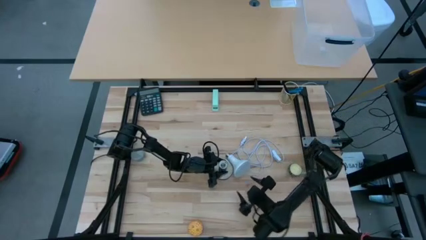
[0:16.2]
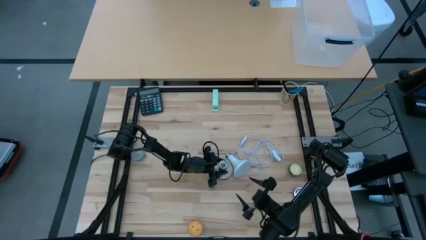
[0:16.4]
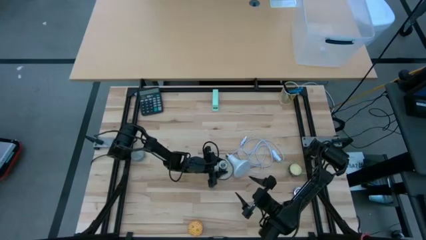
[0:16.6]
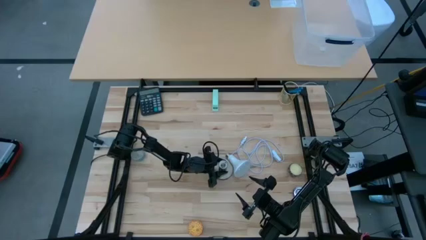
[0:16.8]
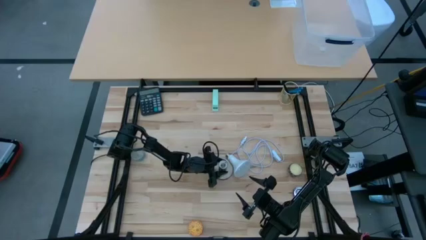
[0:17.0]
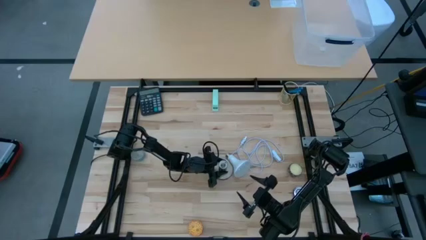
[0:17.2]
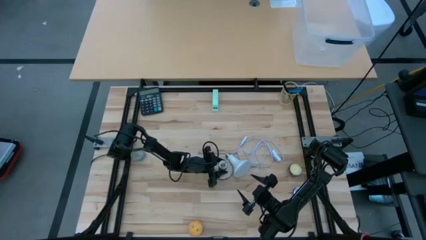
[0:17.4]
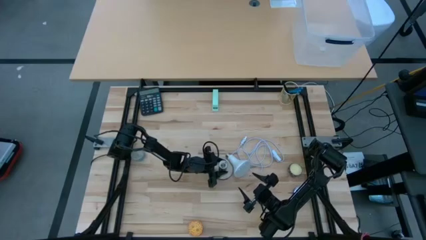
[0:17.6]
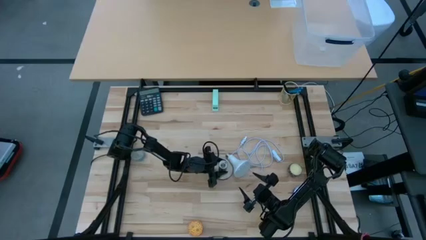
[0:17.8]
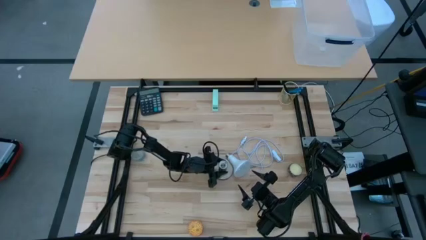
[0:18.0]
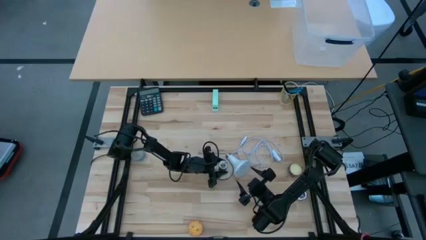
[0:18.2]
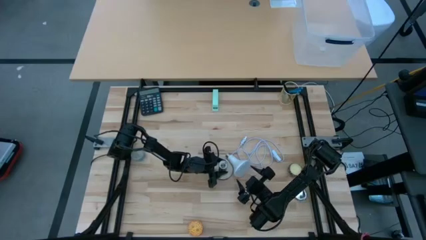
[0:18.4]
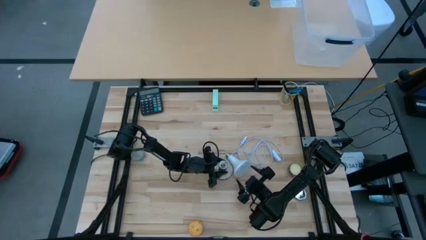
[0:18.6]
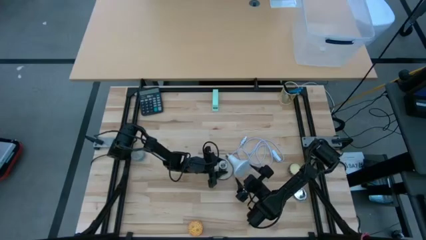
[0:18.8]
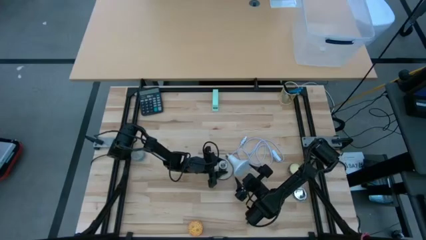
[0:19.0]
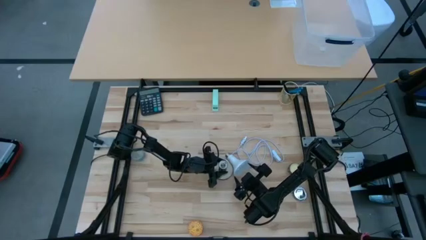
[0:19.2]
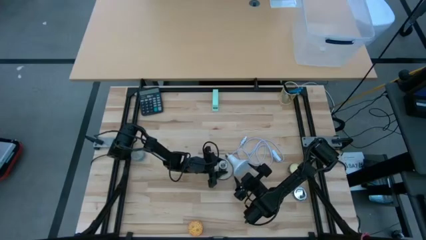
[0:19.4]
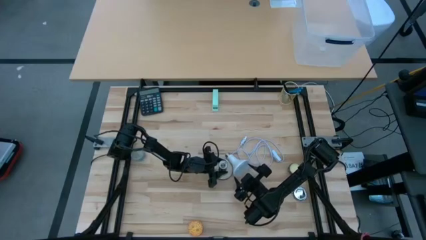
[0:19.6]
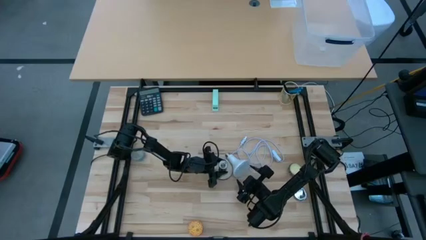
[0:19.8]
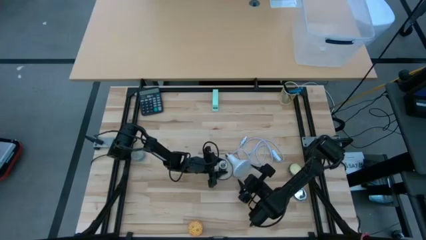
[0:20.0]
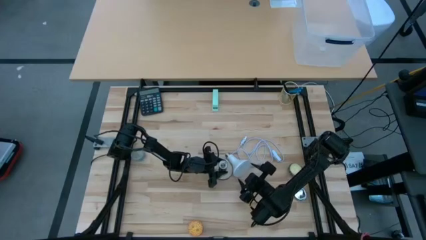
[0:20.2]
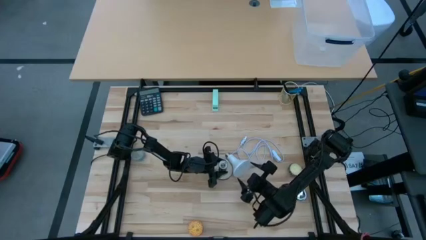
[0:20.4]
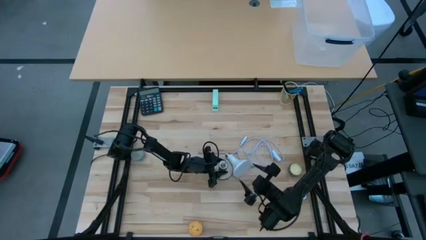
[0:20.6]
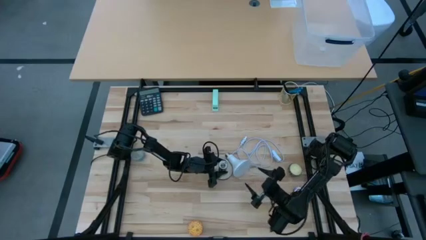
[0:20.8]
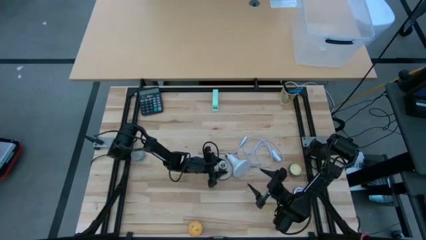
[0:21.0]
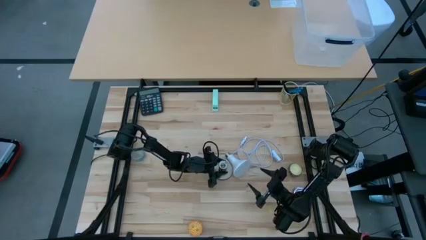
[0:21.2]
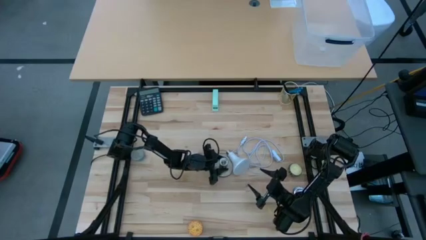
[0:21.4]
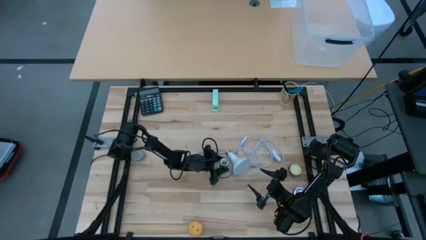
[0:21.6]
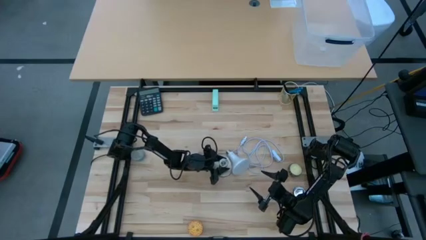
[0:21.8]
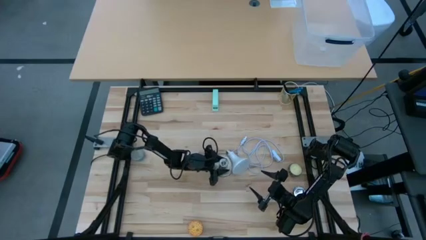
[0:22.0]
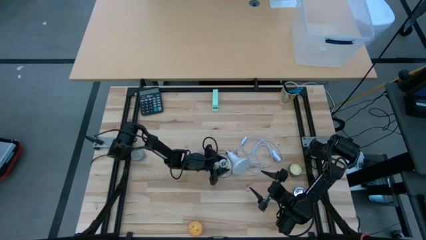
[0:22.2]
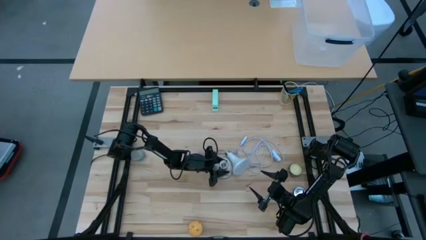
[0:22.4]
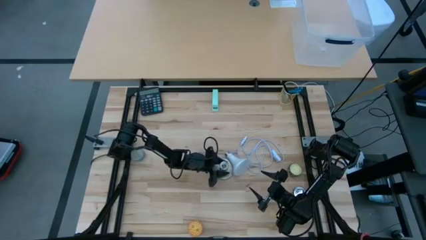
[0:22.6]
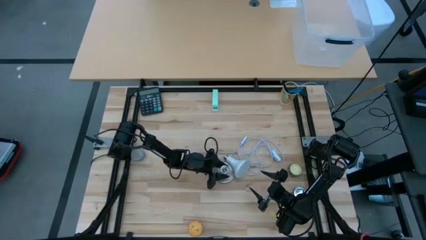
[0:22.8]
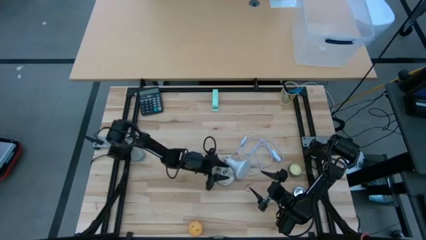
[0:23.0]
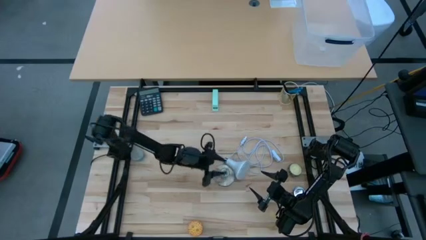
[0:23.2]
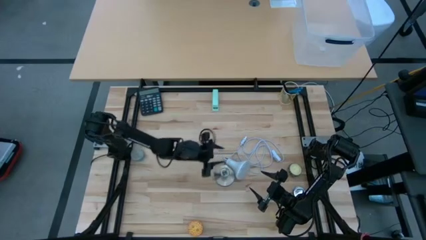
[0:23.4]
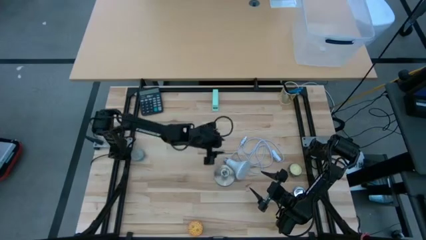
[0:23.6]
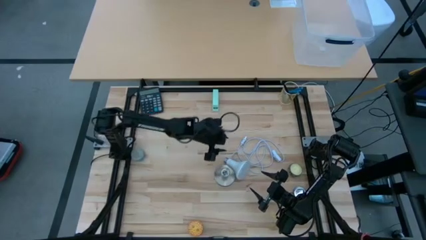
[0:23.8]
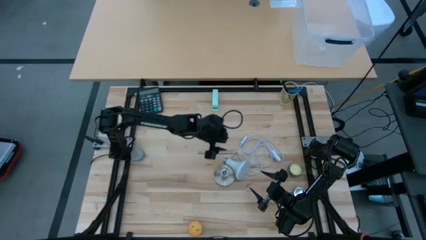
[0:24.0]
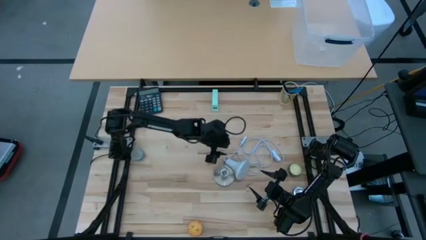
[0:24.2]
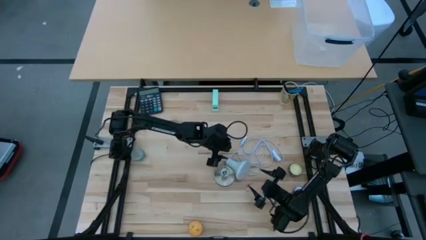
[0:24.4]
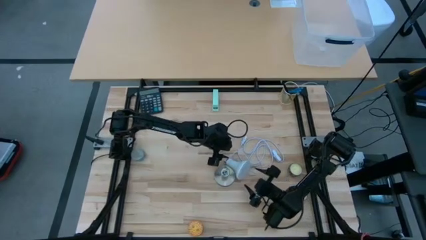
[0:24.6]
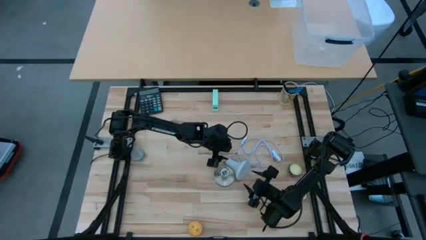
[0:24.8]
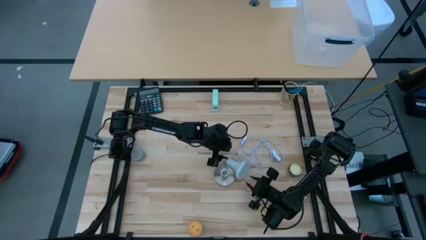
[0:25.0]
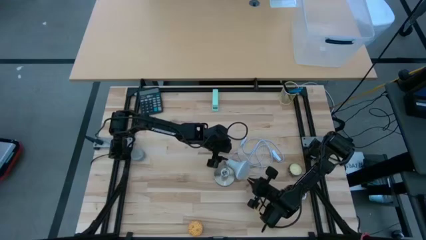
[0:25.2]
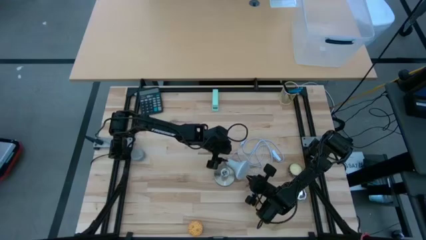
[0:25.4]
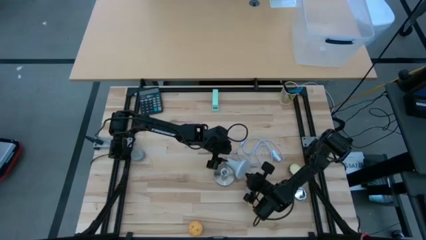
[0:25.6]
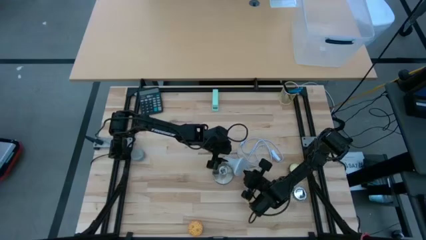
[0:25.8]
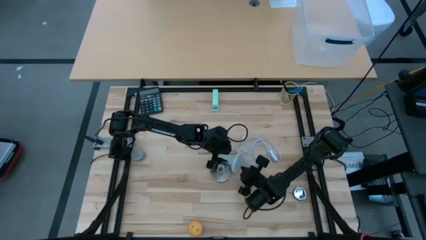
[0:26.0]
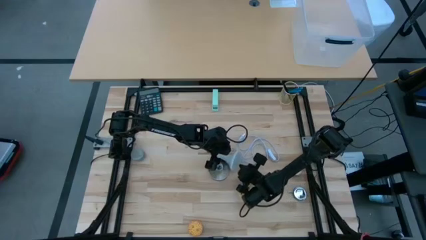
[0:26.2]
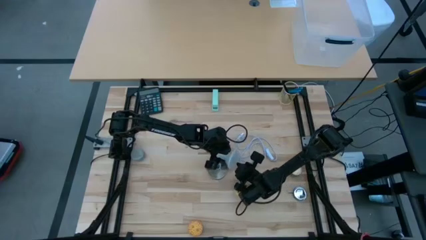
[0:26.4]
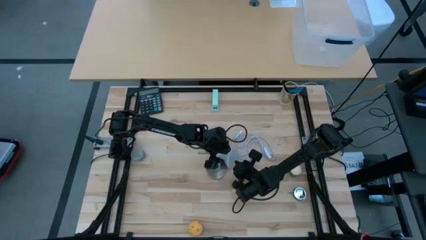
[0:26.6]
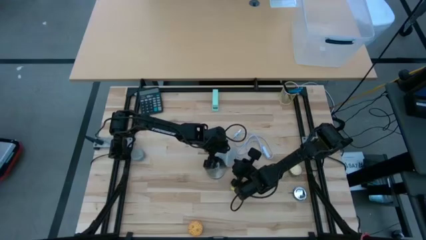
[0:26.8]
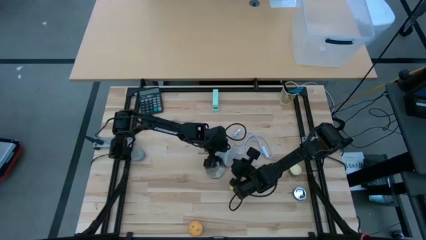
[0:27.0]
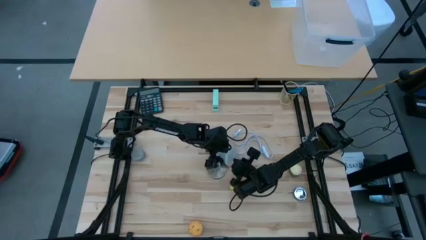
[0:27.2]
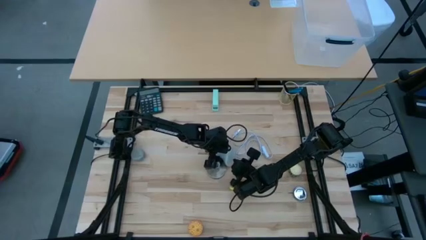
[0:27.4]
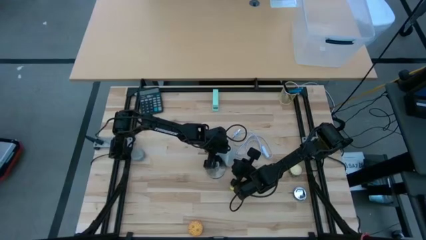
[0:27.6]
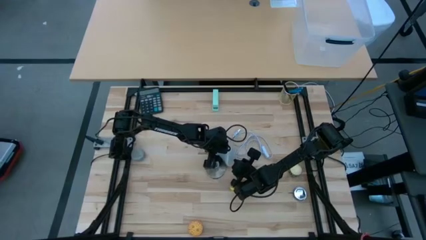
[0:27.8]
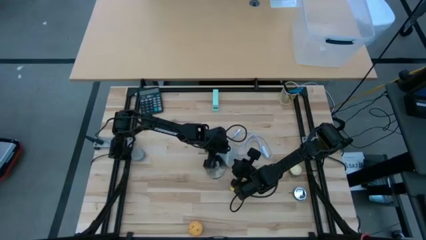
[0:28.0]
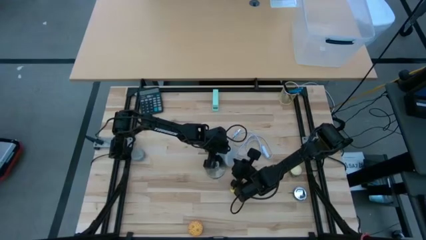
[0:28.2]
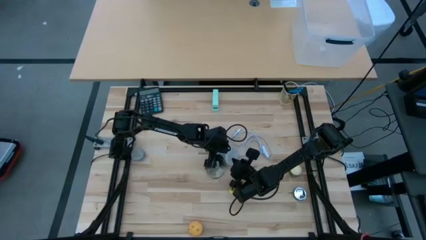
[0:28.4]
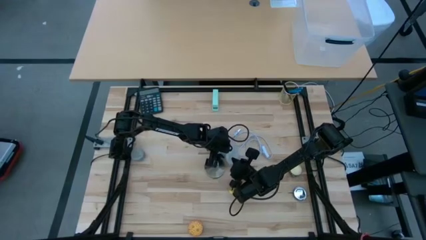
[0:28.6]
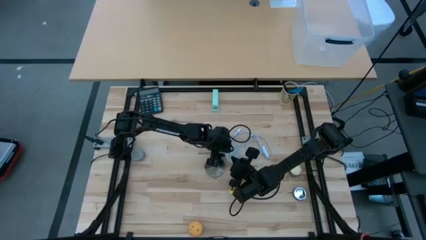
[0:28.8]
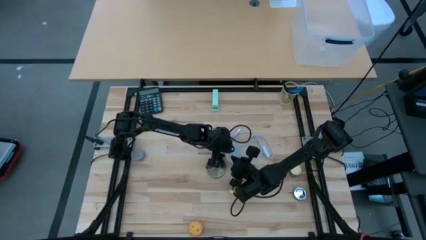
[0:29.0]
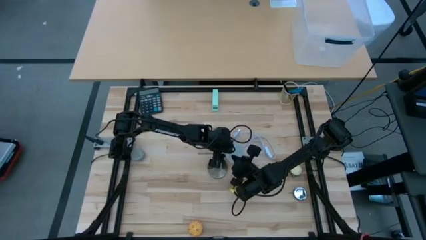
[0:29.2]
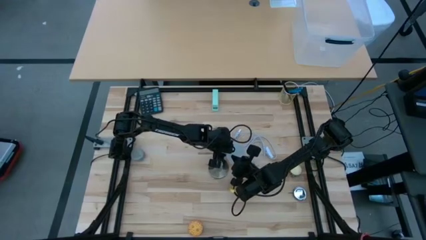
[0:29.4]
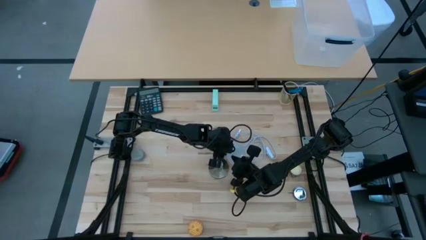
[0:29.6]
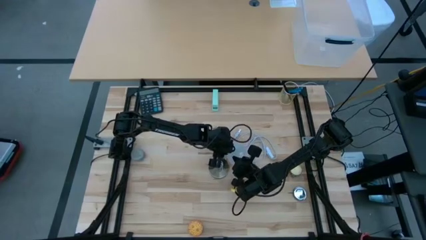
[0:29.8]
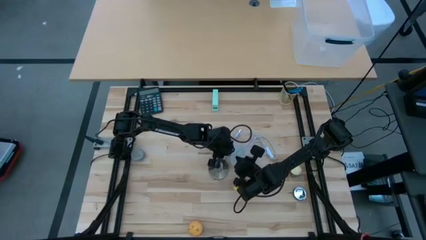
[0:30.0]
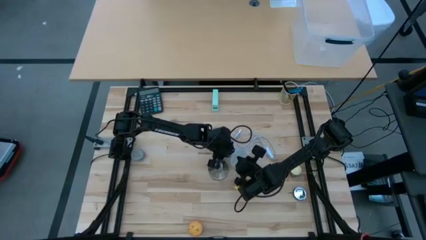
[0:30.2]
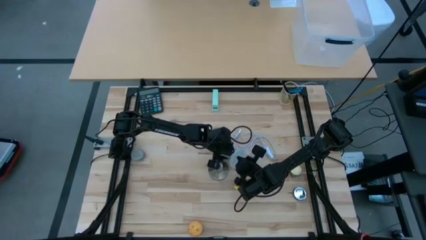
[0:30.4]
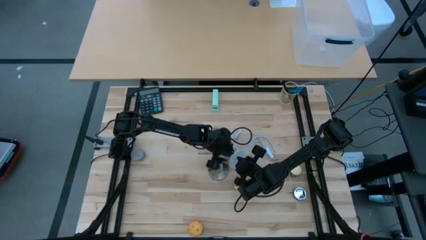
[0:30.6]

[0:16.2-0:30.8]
Task: Screw lightbulb
Prepare the lamp
